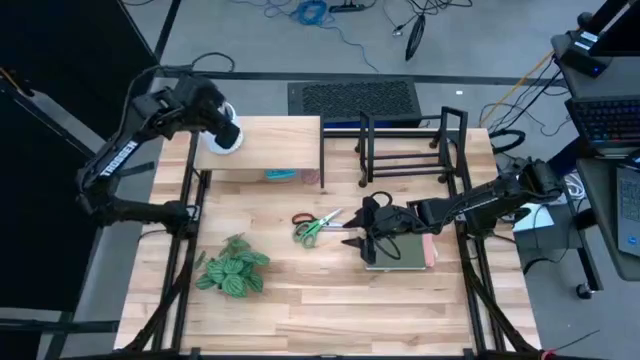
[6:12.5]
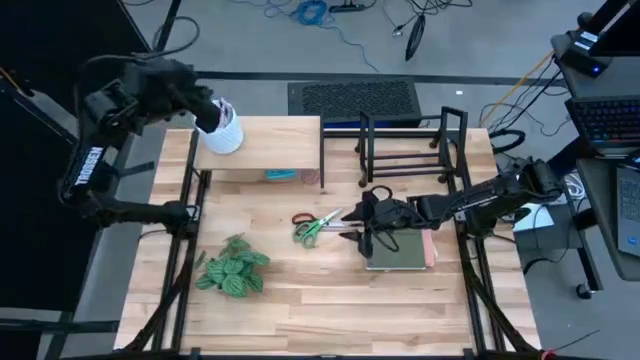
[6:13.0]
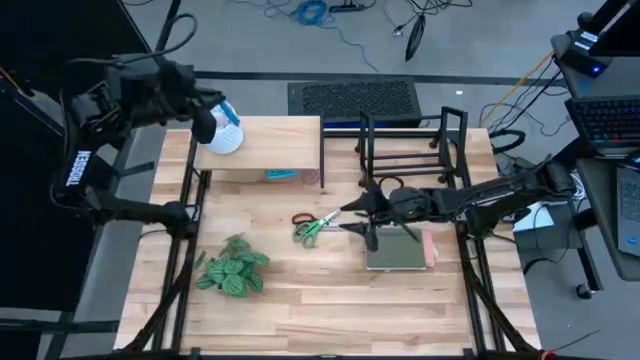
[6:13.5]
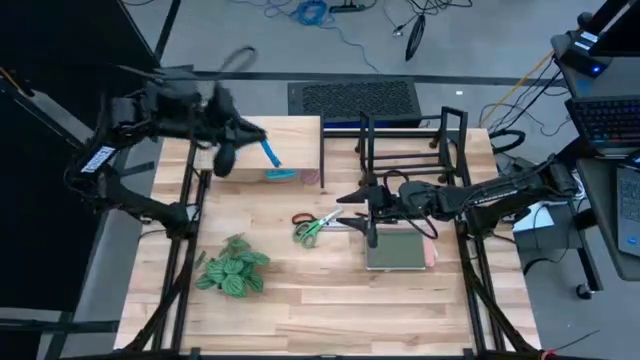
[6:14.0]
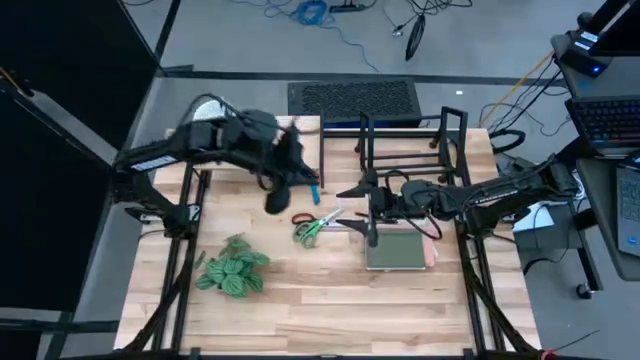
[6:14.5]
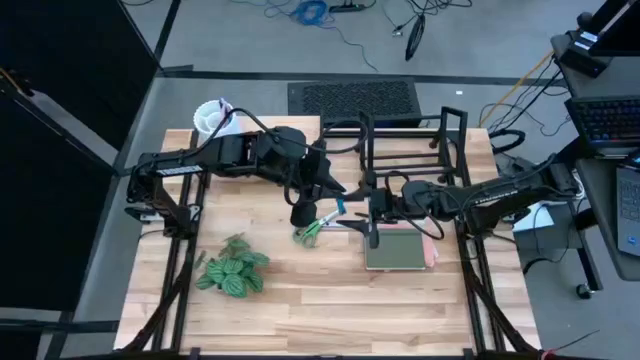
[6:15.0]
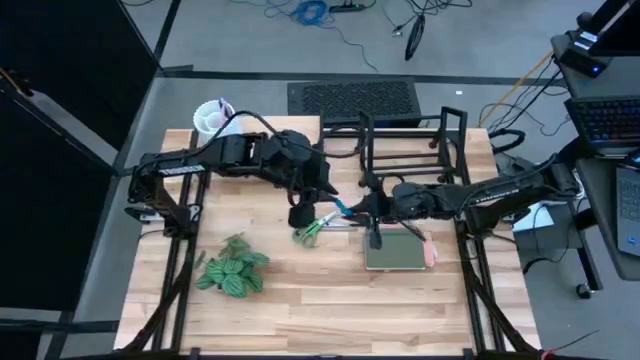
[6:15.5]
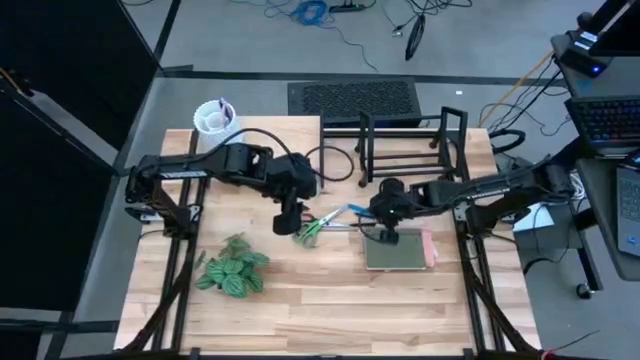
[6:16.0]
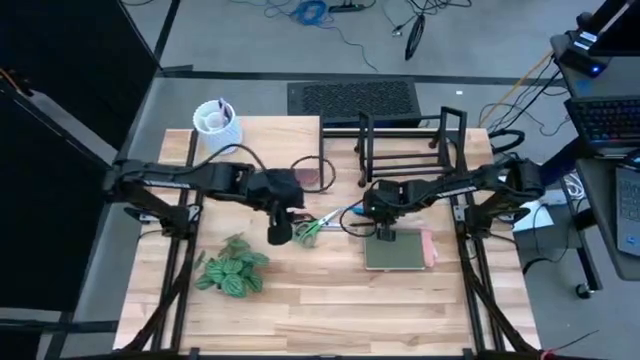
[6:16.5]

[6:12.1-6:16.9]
Task: Stock shelves
Remove the blue pen from the white pen holder

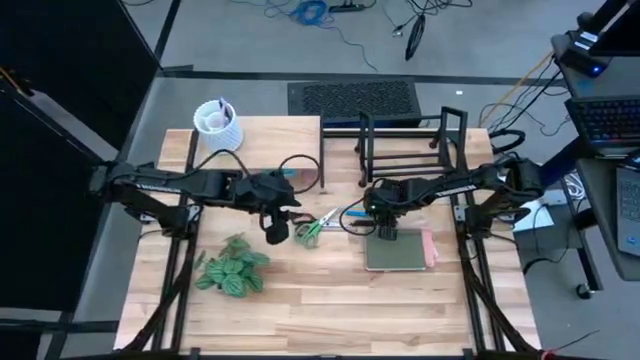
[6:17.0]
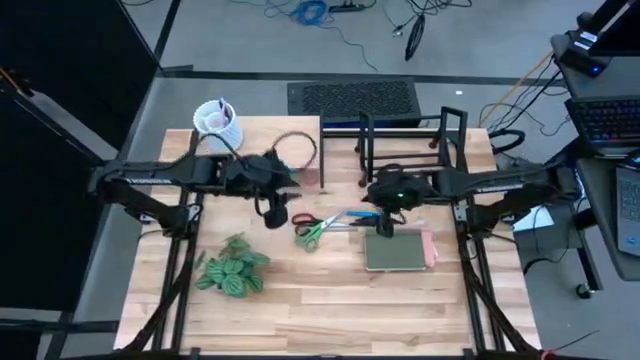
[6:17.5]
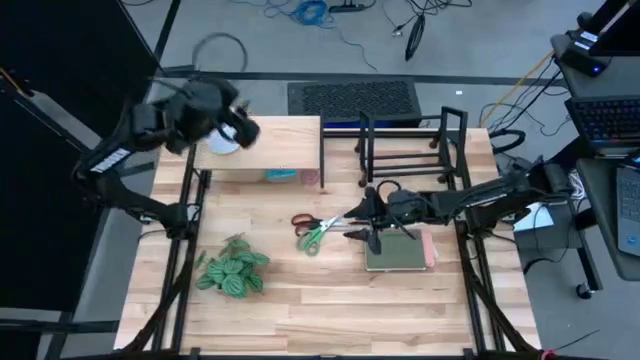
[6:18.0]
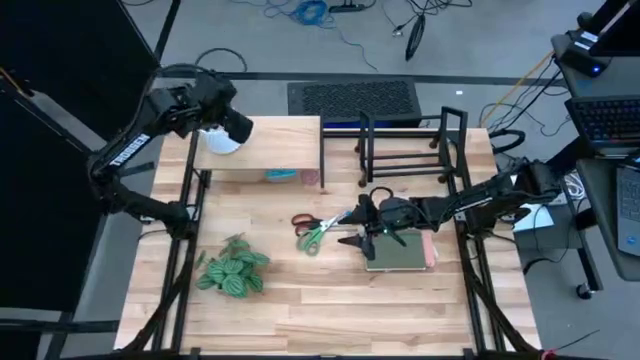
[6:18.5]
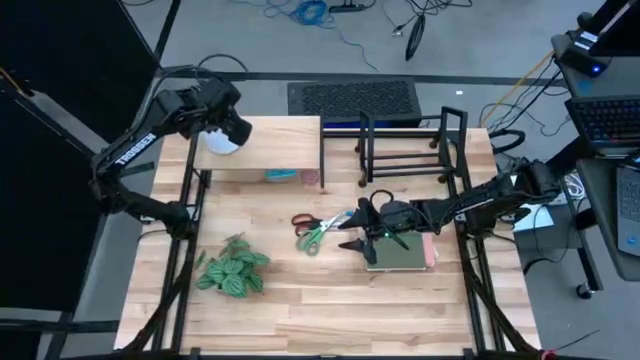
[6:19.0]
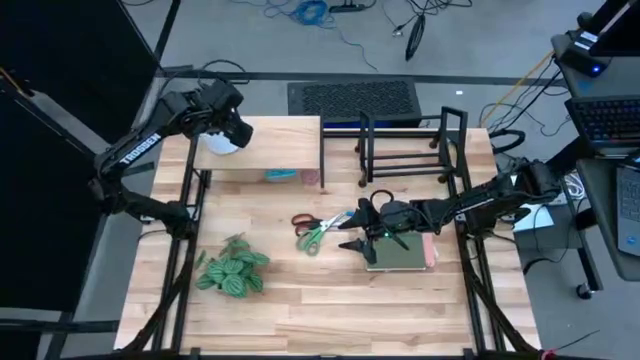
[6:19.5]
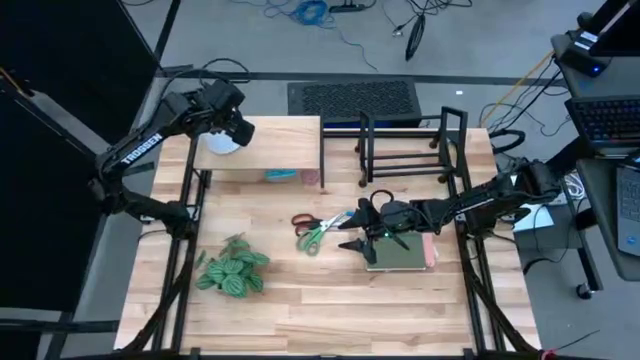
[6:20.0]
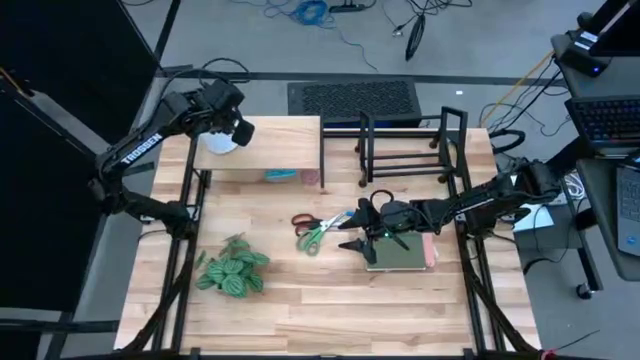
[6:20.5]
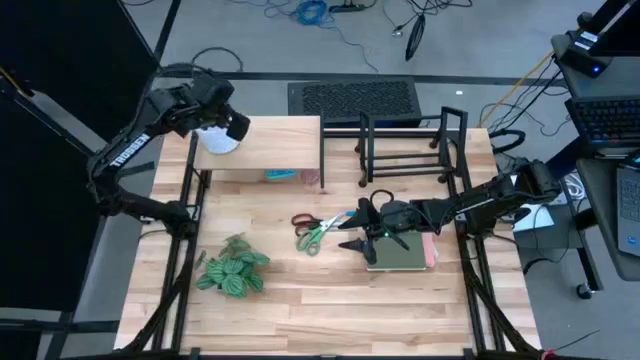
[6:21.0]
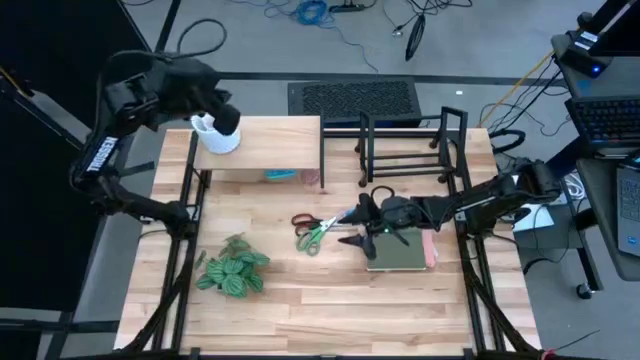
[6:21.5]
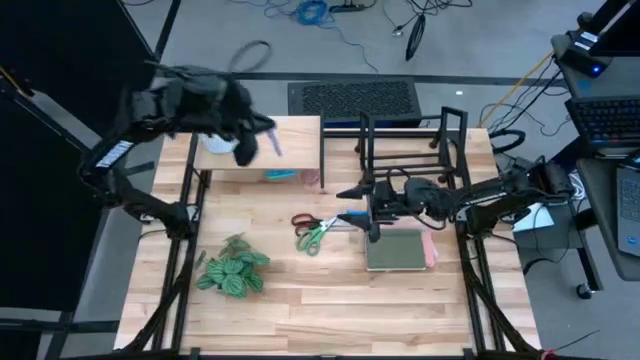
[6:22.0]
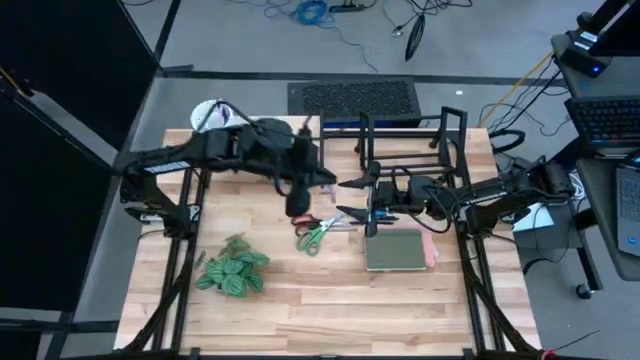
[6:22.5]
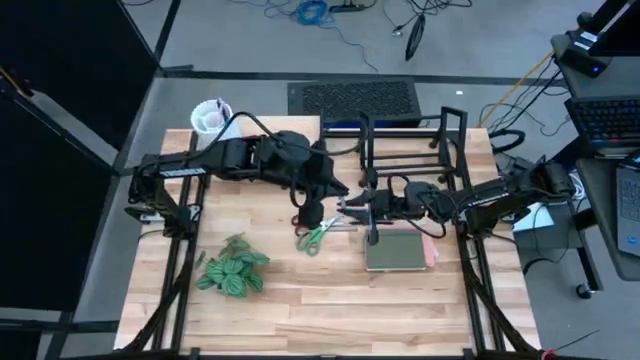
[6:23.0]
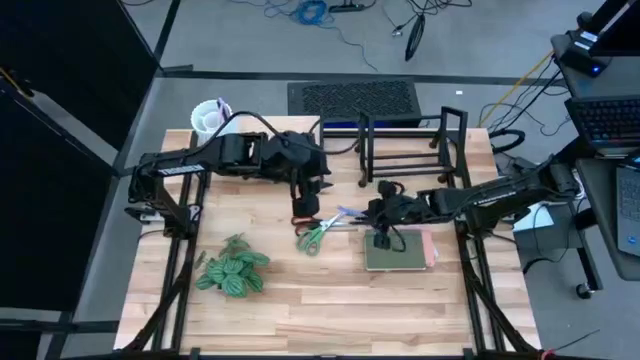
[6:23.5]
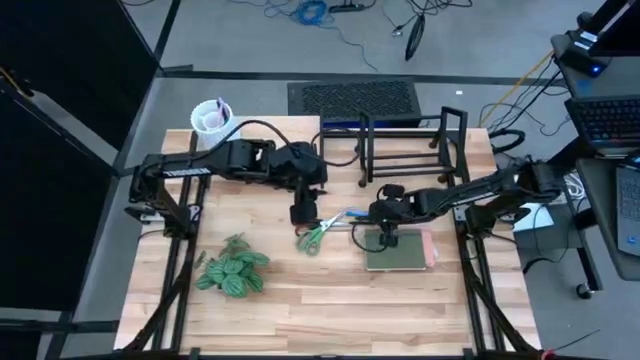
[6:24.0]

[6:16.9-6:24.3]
Remove the purple pen from the white pen holder

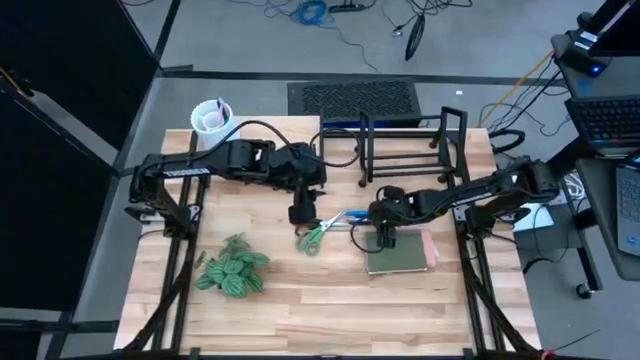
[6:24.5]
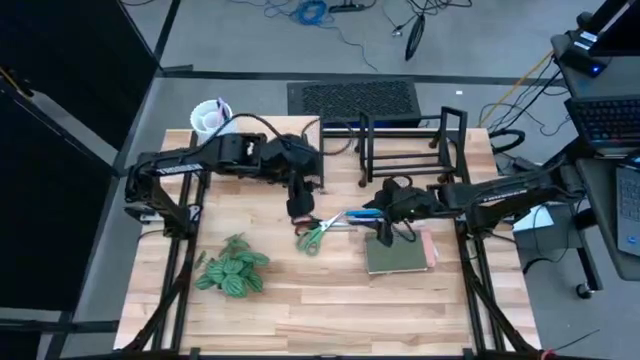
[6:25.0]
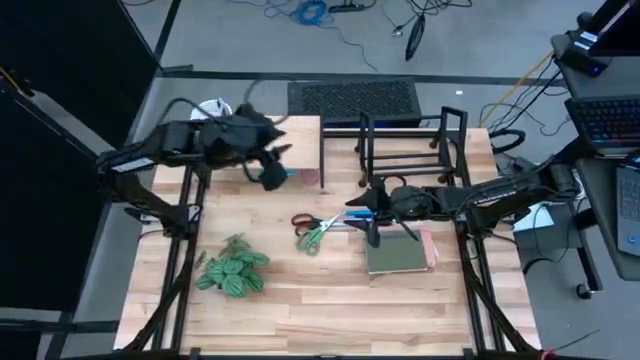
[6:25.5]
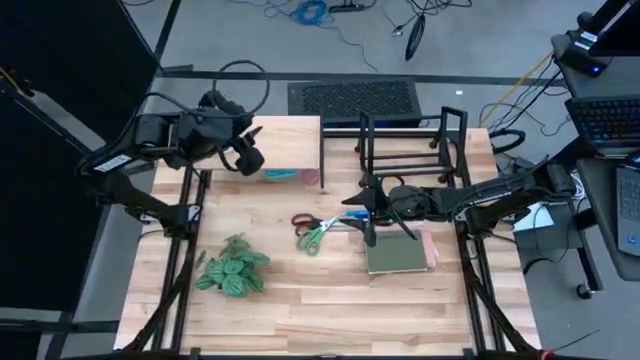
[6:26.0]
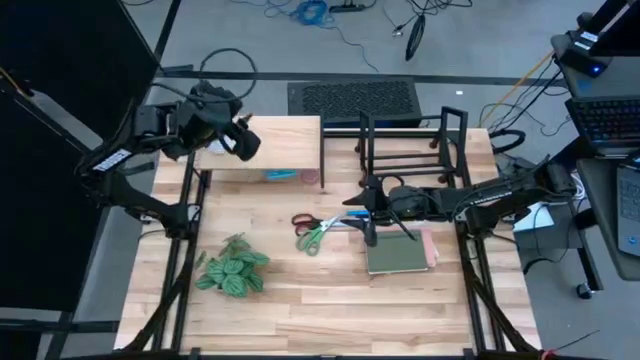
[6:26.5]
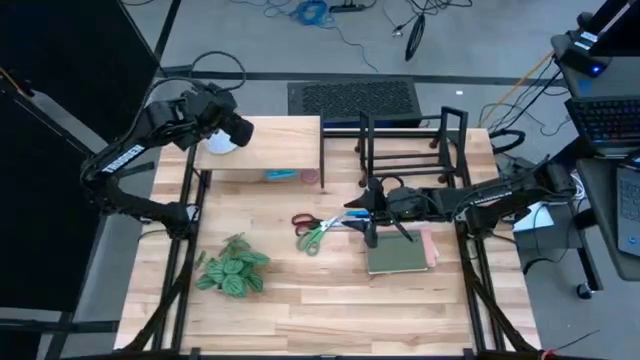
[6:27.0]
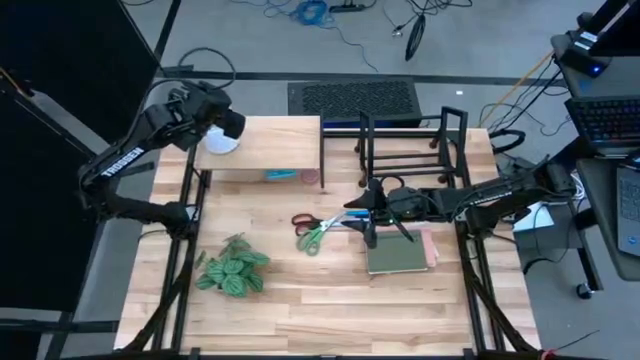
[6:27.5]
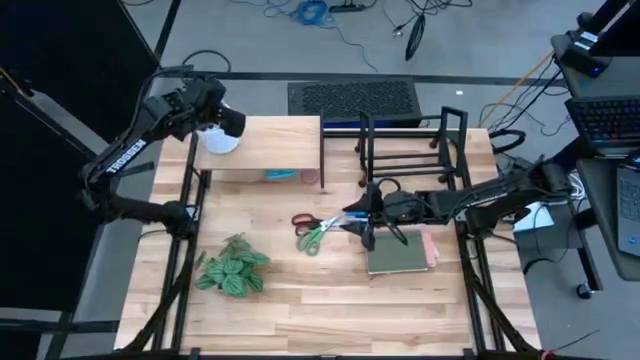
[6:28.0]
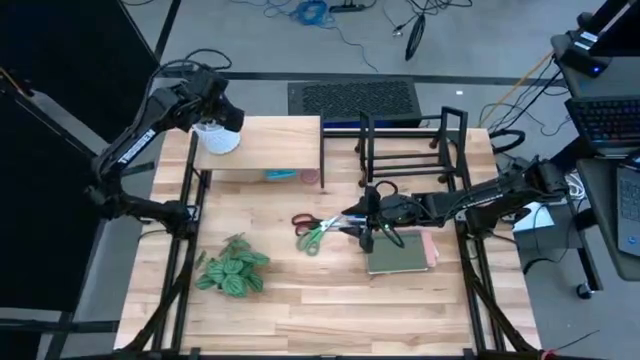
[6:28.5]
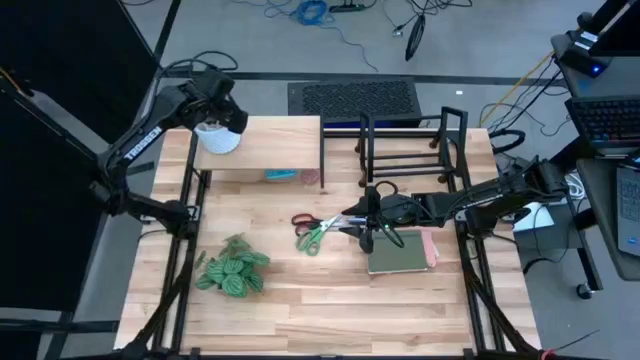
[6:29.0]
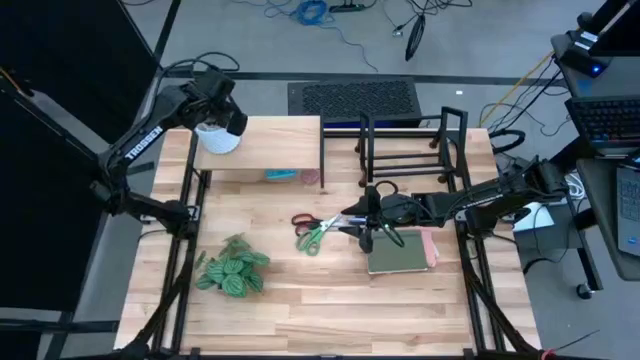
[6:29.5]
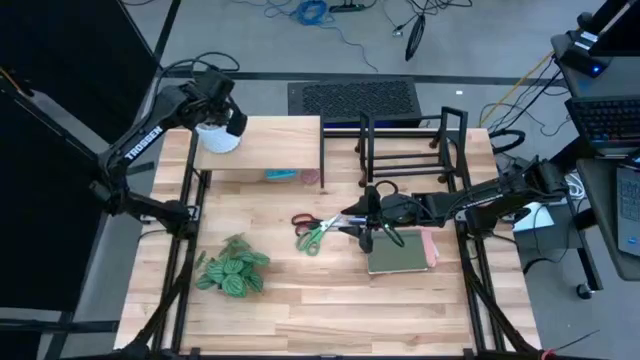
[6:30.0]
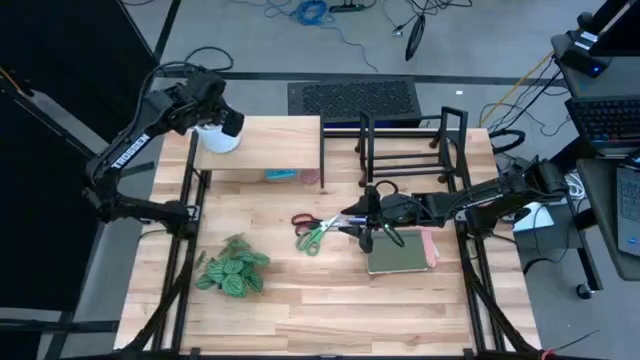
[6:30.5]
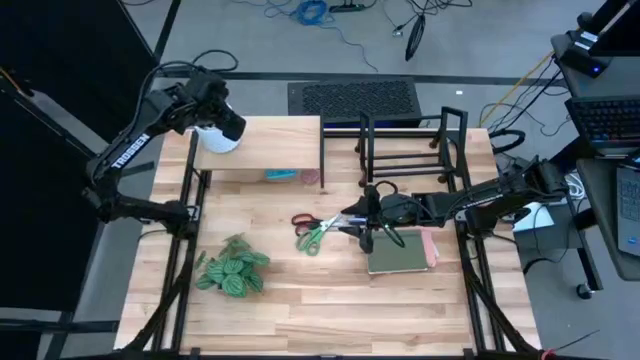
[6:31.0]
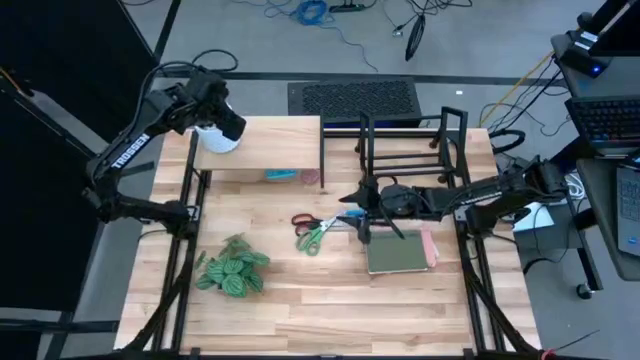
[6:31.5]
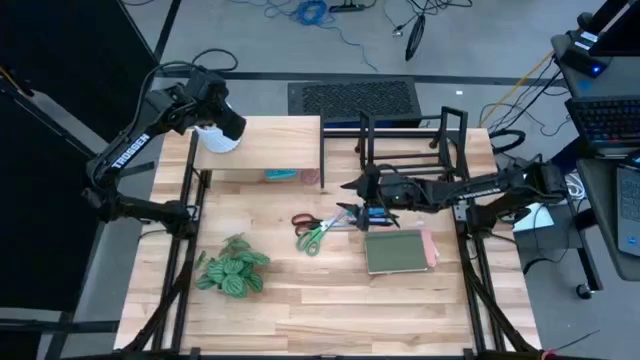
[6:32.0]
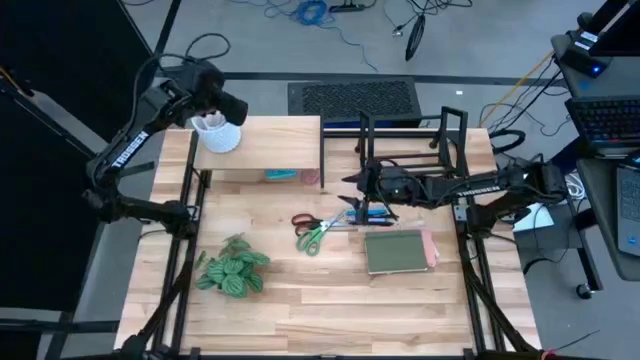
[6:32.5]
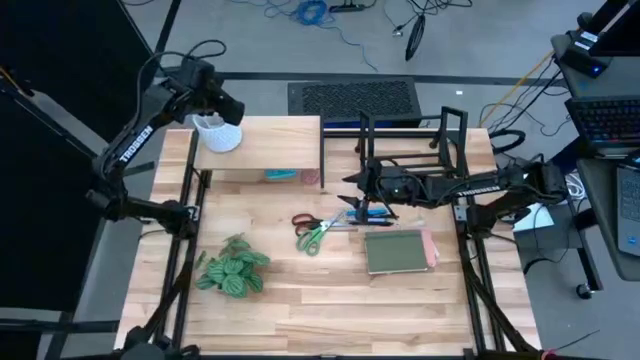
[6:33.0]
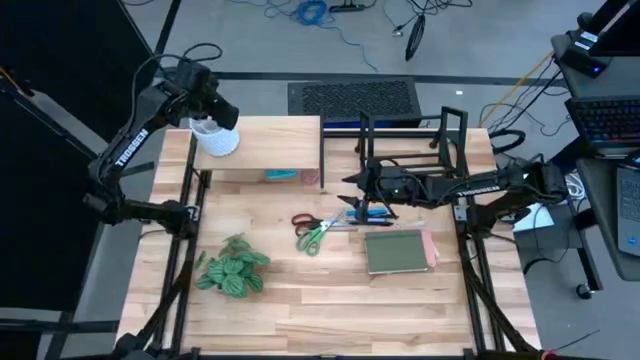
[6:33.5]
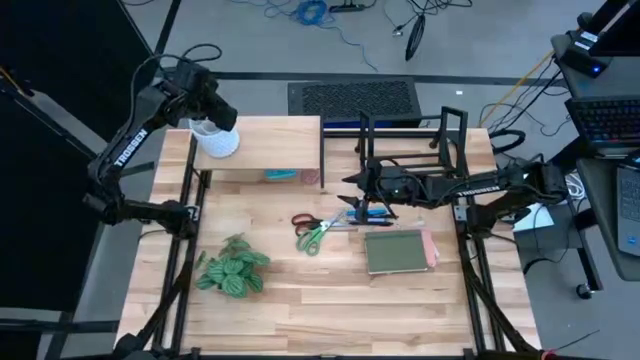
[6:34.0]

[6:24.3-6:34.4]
Remove the pink pen from the white pen holder
